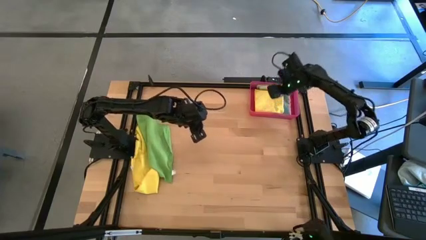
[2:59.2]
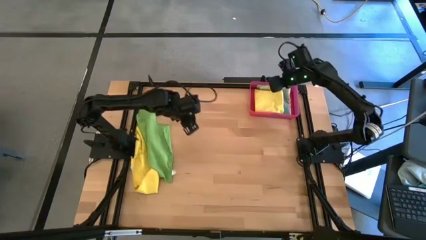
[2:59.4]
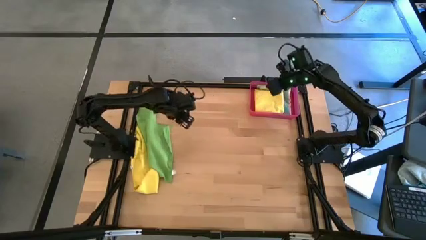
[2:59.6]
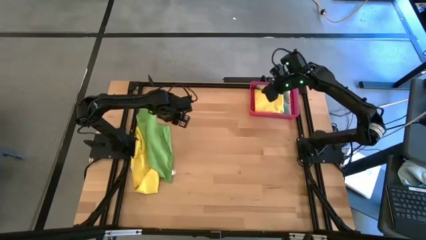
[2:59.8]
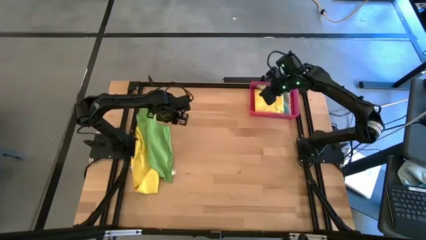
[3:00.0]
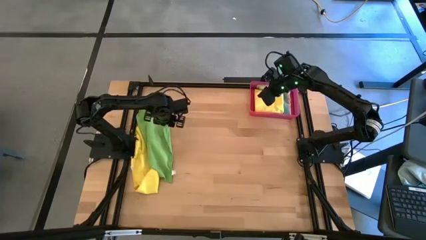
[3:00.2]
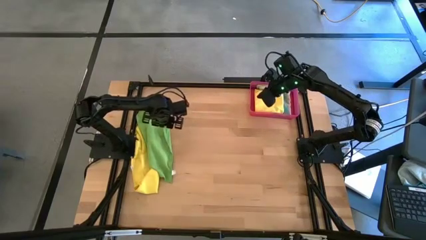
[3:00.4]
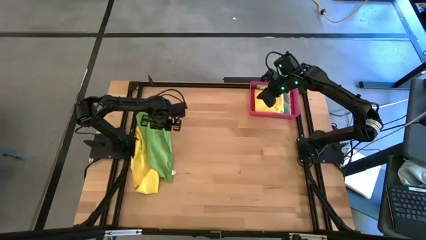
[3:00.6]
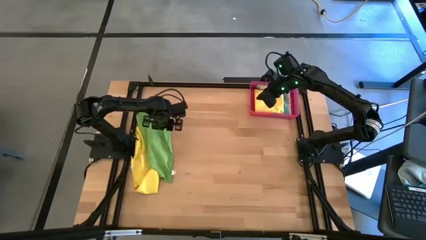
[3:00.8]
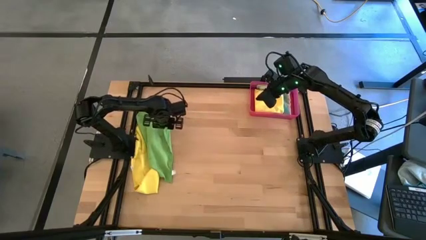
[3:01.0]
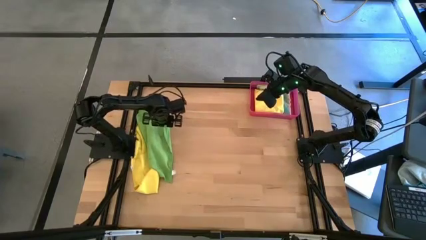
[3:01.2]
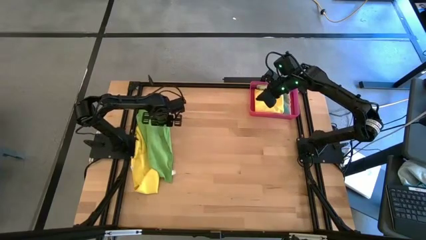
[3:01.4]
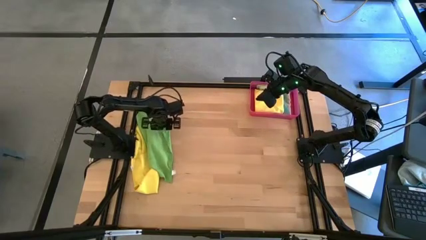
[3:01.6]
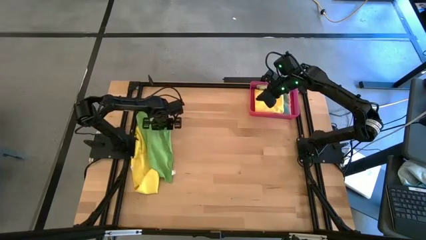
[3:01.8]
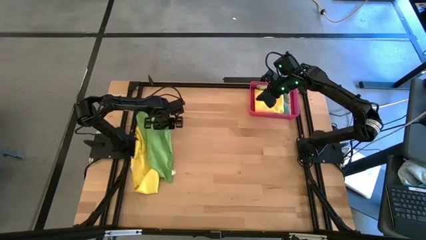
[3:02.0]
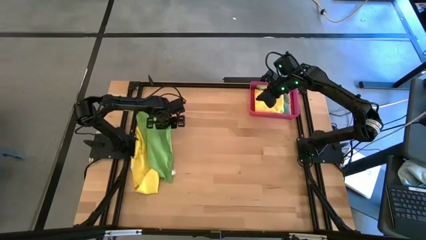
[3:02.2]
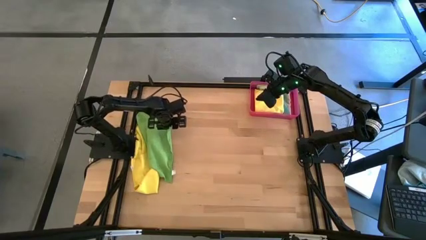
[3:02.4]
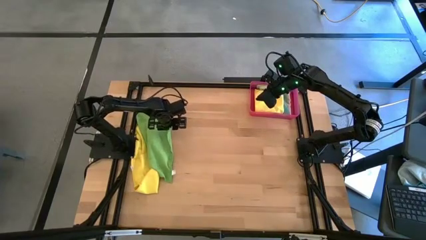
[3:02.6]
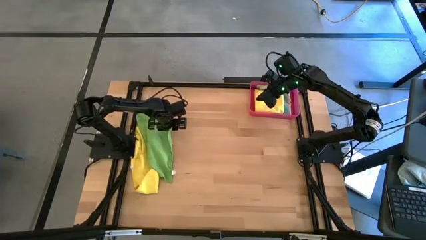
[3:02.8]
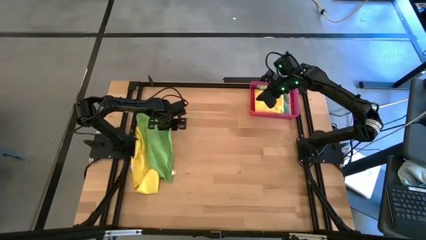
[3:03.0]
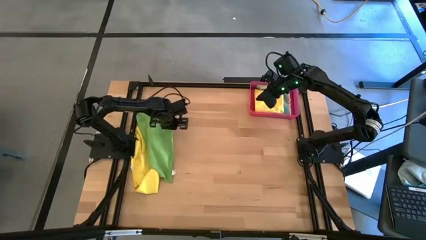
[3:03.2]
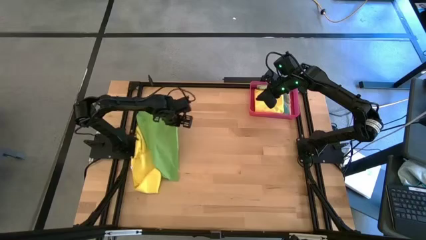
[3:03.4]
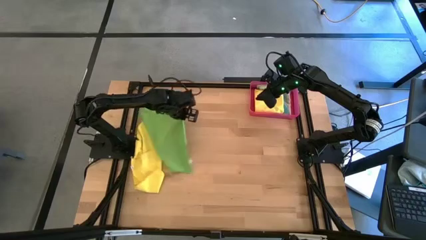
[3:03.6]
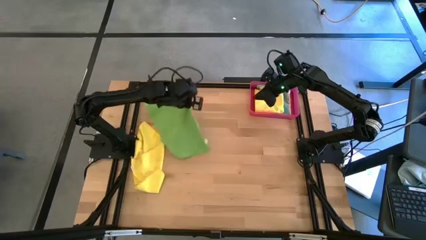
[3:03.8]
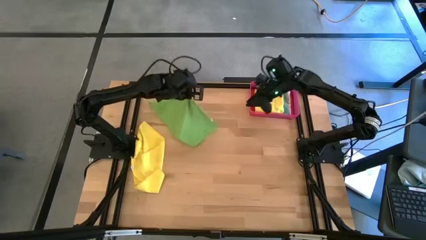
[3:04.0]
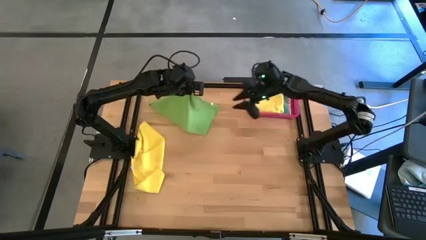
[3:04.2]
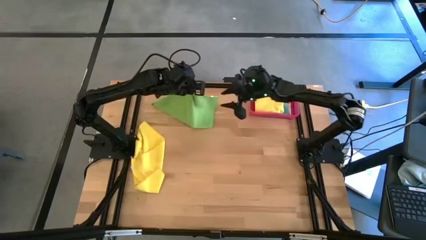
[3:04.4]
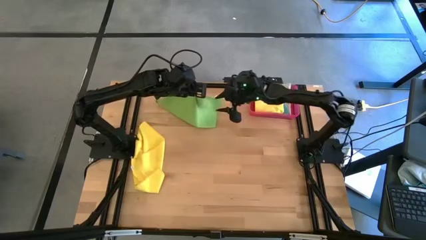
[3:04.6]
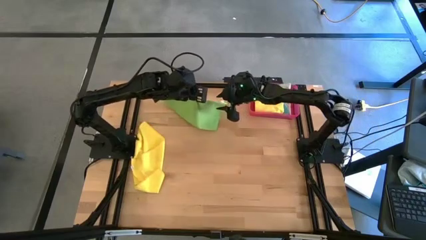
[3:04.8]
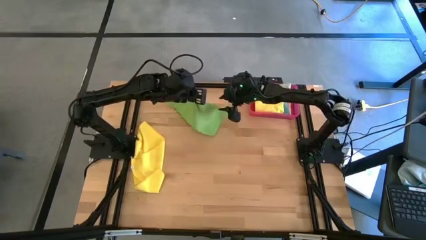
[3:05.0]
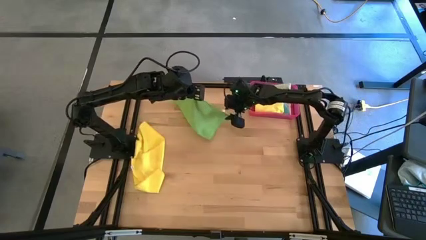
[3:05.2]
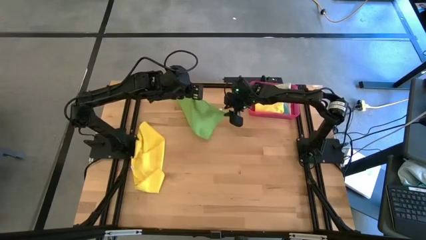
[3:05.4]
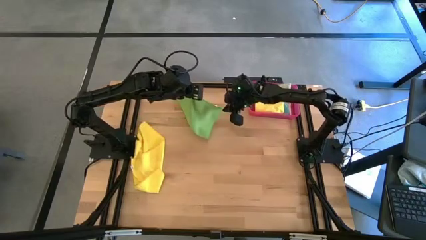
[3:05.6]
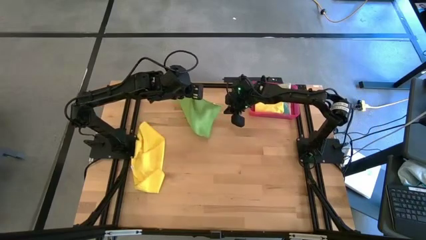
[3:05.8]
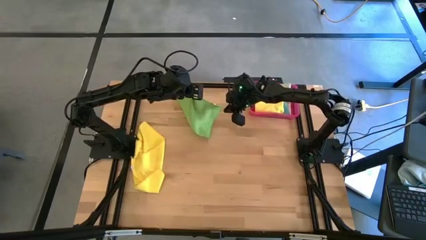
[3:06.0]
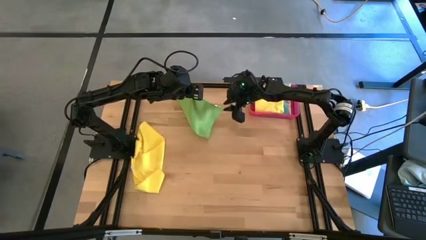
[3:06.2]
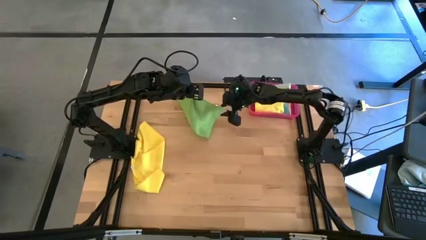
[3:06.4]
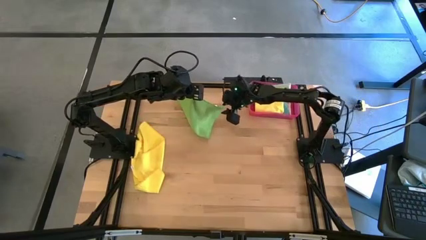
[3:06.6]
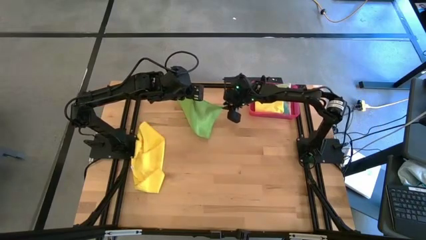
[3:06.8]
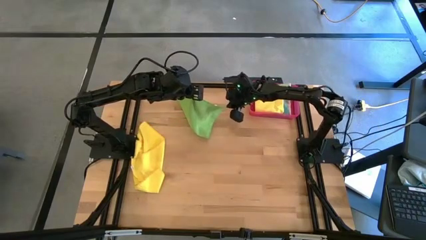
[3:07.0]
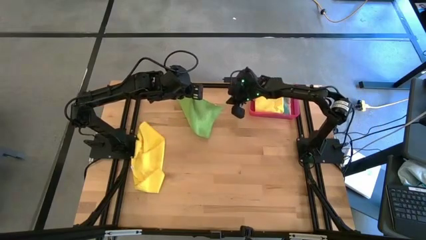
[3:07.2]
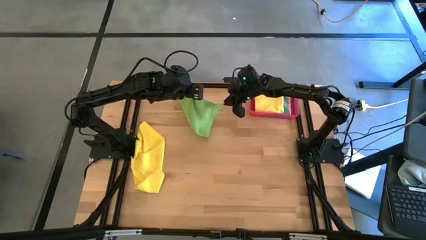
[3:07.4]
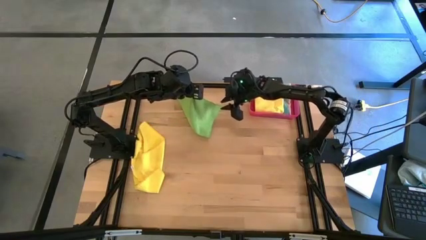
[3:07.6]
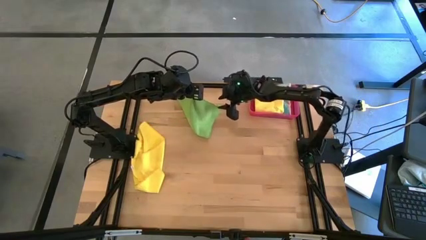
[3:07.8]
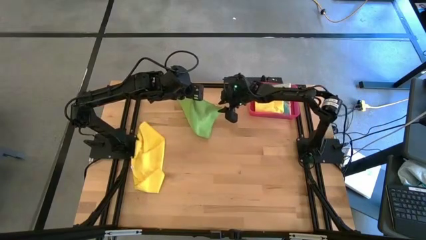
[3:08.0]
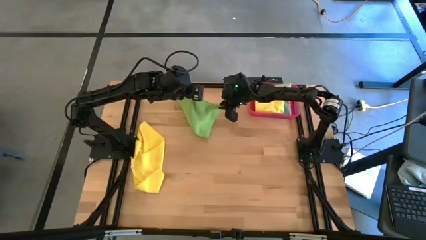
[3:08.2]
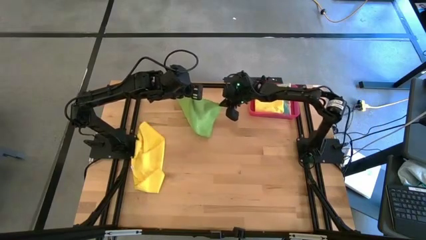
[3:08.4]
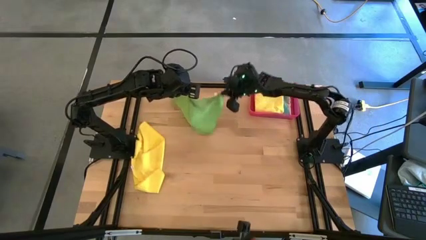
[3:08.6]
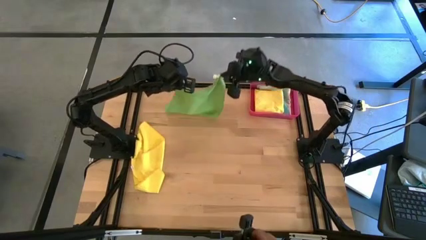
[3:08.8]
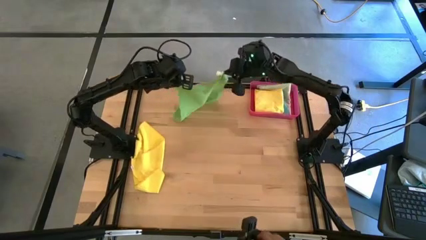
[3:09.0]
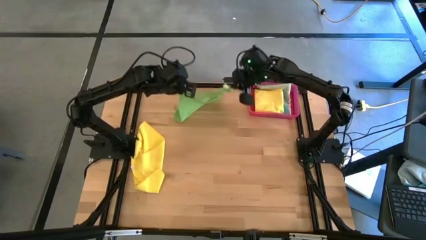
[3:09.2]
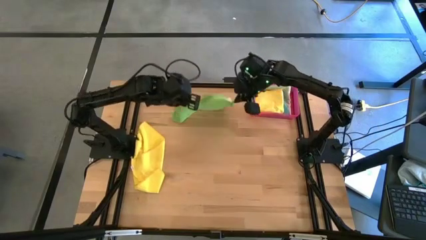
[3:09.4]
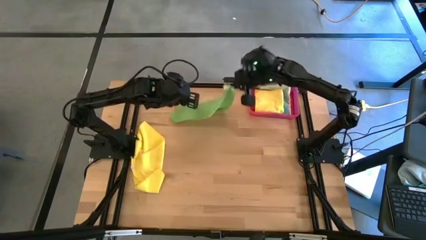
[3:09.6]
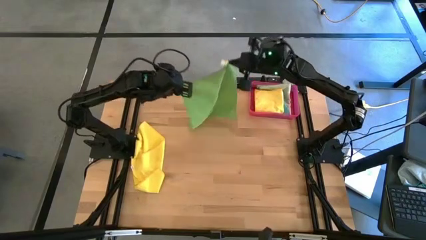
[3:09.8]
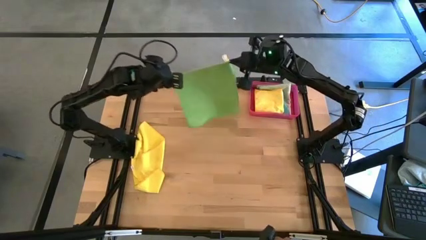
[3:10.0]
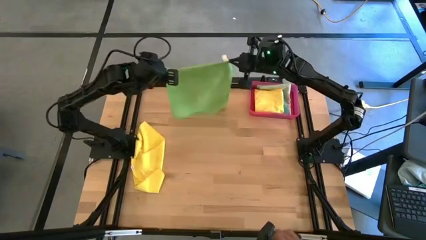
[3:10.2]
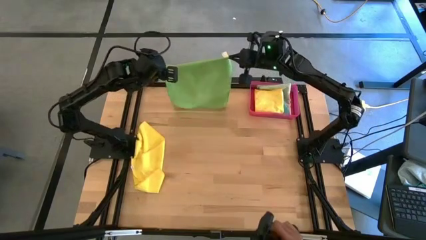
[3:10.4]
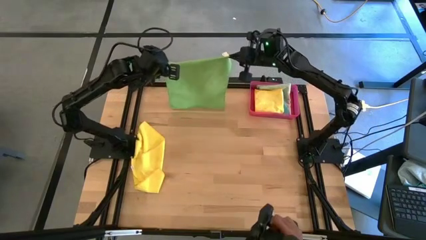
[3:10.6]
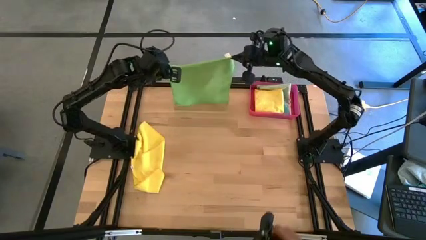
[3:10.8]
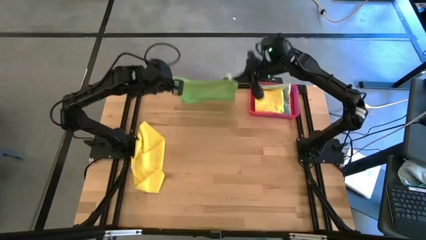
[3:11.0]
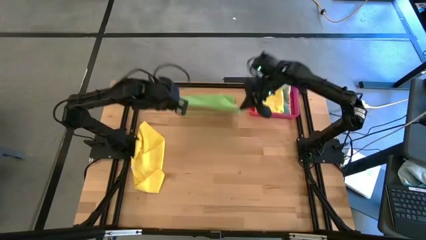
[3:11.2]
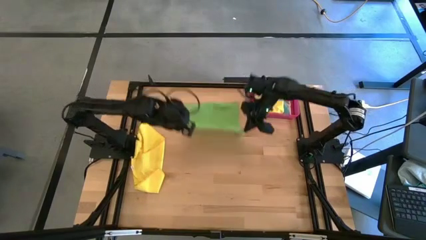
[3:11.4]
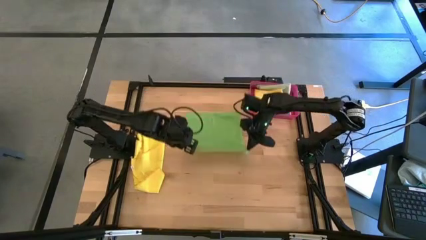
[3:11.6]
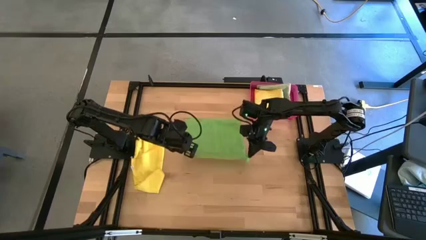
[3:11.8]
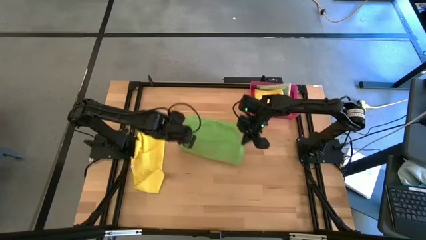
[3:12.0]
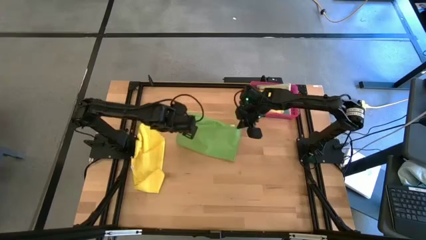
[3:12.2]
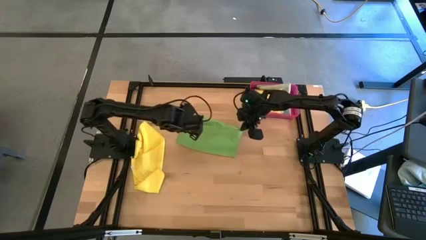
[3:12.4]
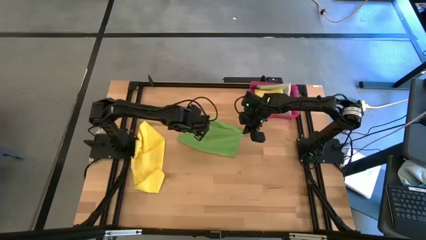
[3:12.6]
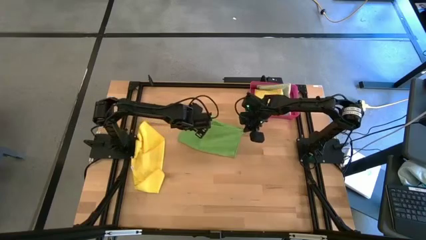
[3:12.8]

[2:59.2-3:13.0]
Task: Fold microfiber towels
Fold the green towel

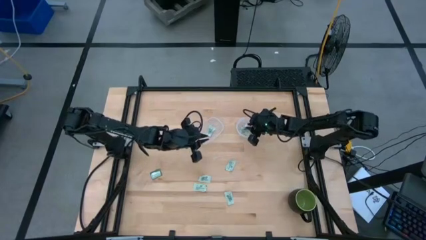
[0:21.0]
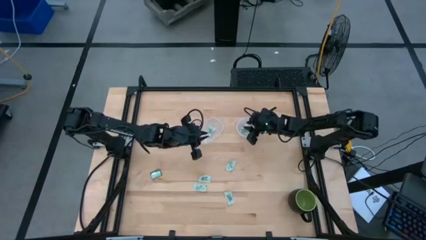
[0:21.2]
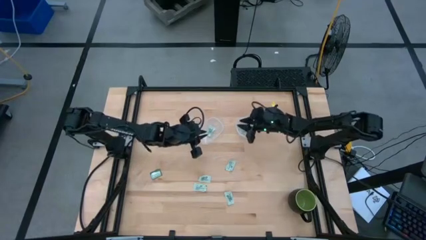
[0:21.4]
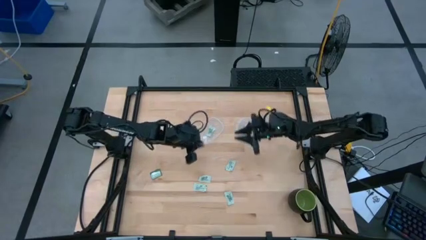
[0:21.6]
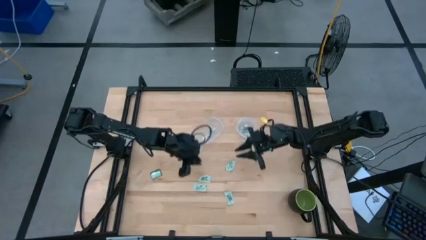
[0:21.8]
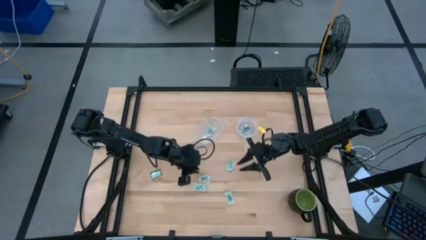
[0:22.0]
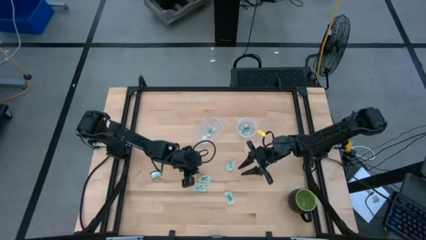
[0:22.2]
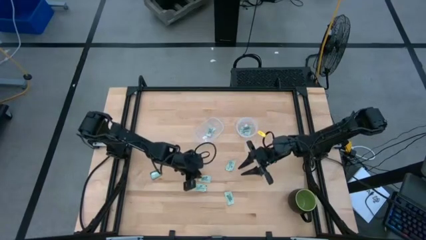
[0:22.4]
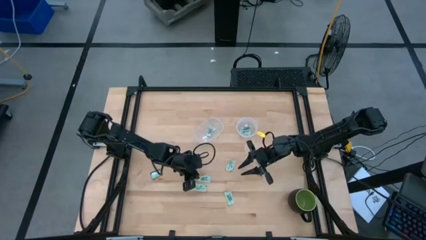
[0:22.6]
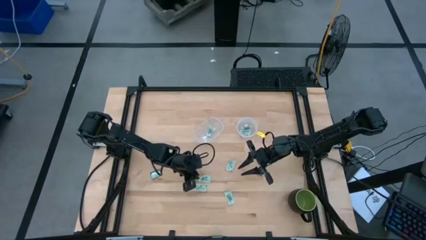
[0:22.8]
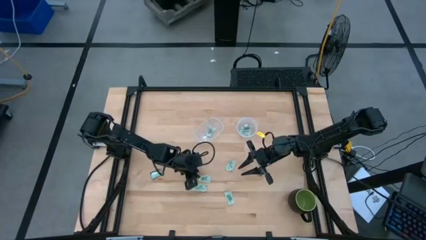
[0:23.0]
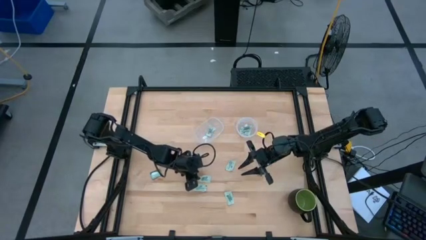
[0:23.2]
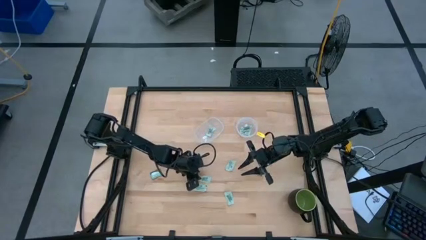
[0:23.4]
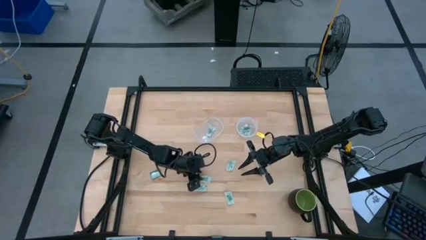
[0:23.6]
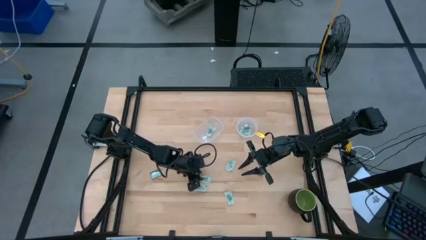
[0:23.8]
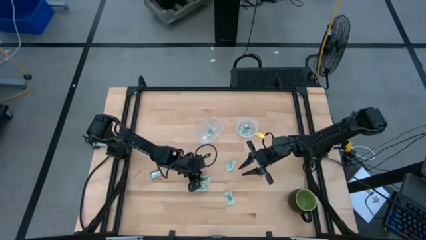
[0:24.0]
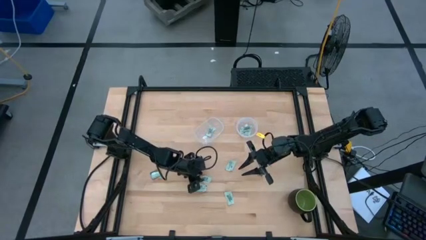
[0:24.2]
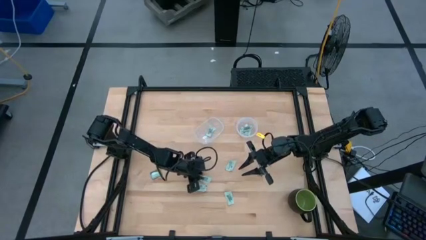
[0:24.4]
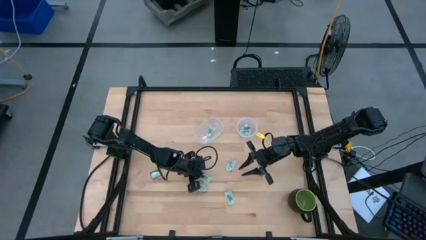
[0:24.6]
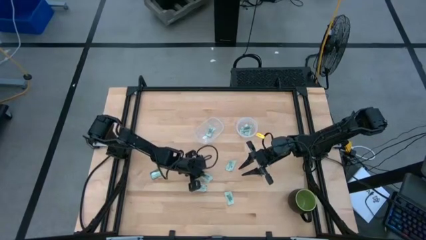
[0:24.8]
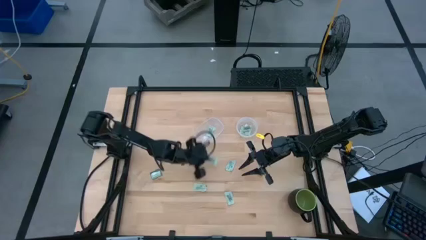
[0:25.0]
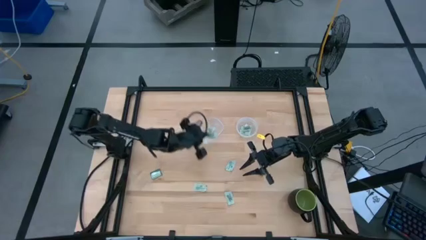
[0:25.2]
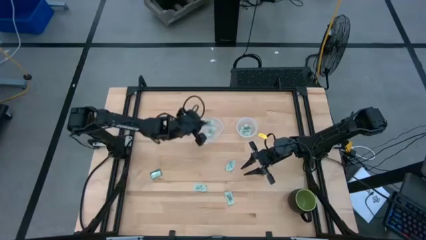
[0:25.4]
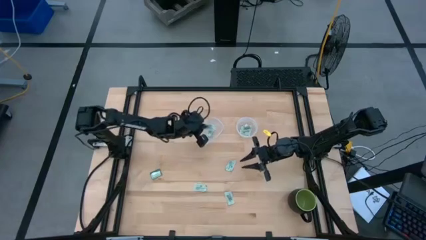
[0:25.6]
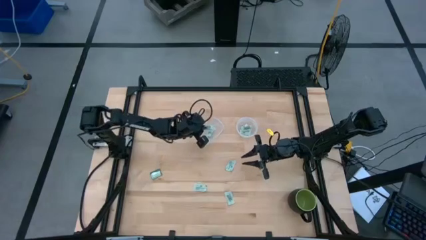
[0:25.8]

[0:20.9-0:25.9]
Task: Pick and place Stevia / Truvia into bins
Put the stevia packet into the left transparent container
